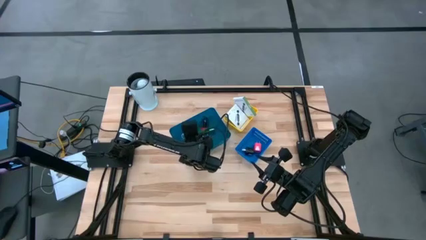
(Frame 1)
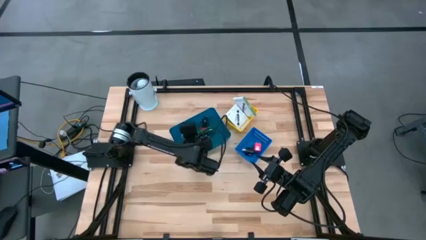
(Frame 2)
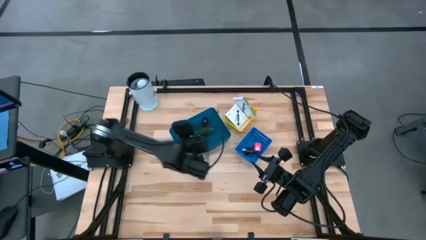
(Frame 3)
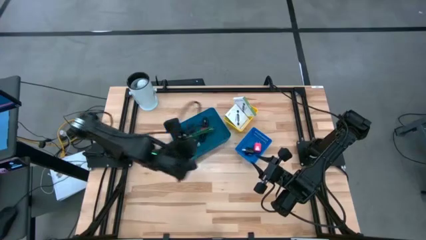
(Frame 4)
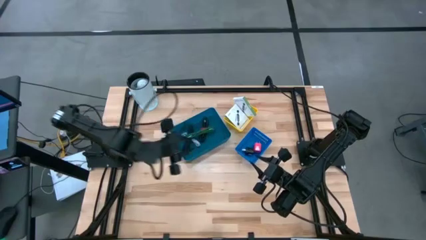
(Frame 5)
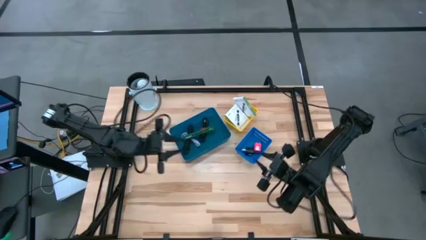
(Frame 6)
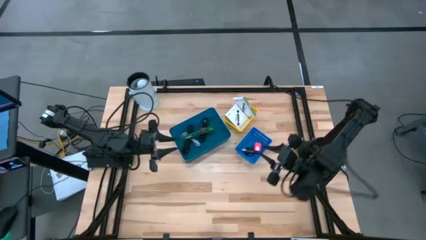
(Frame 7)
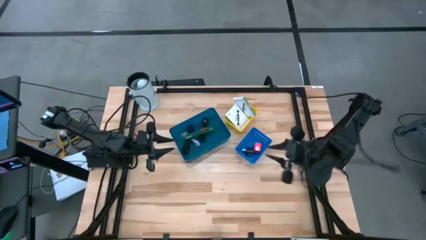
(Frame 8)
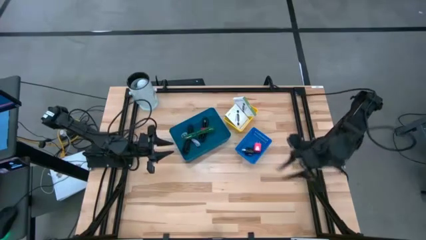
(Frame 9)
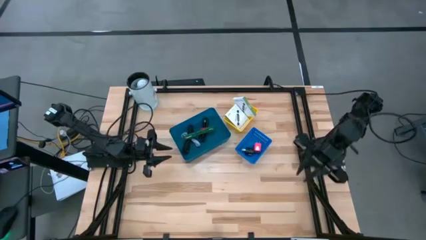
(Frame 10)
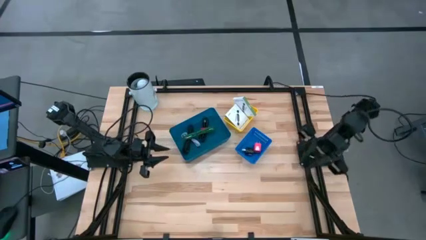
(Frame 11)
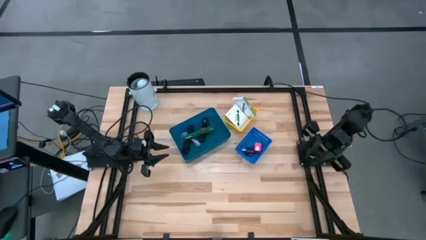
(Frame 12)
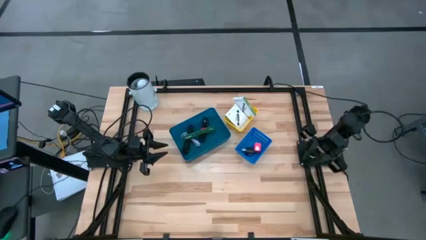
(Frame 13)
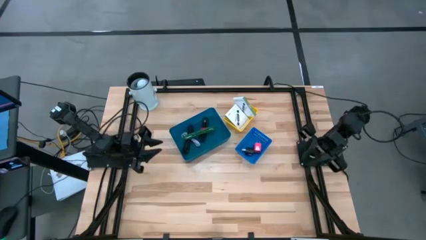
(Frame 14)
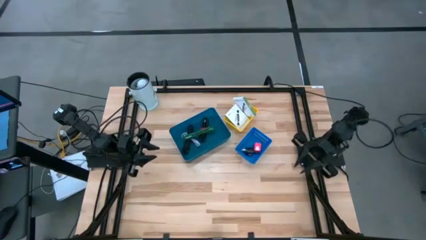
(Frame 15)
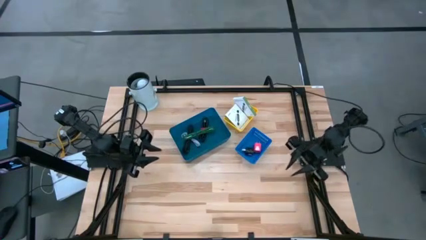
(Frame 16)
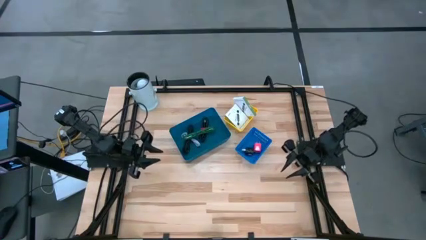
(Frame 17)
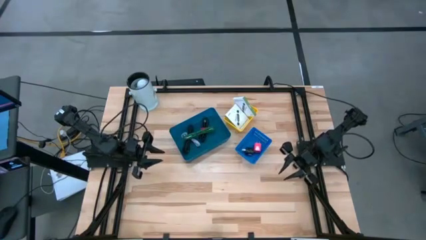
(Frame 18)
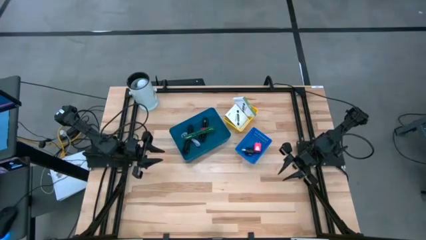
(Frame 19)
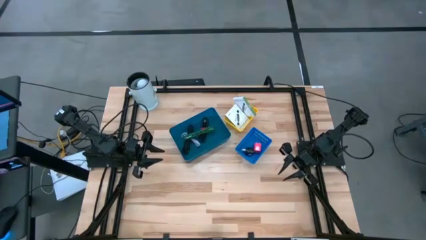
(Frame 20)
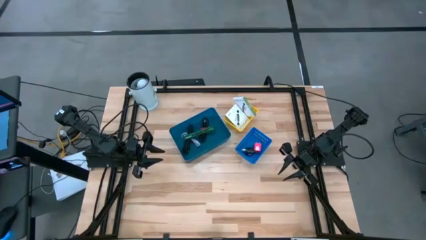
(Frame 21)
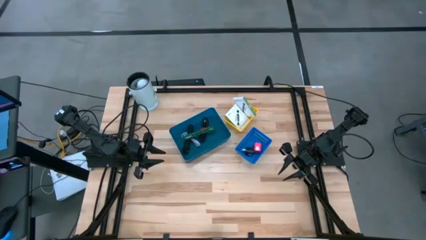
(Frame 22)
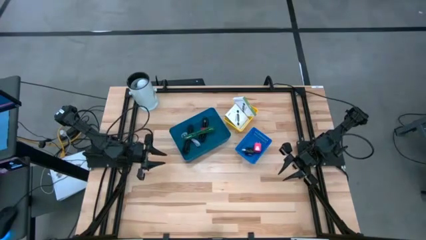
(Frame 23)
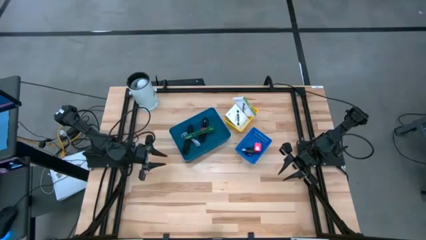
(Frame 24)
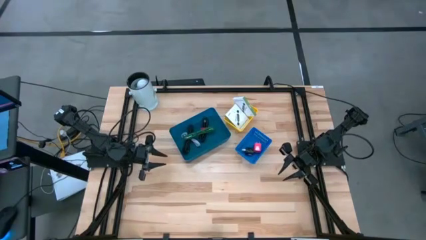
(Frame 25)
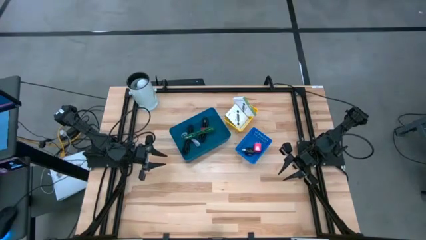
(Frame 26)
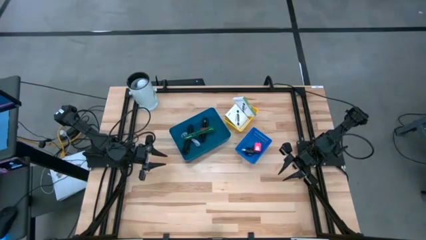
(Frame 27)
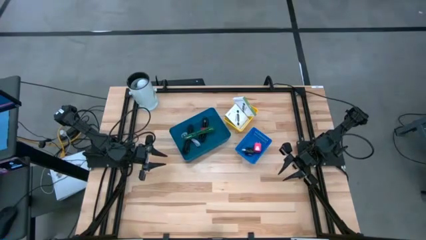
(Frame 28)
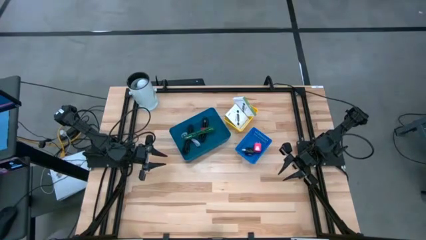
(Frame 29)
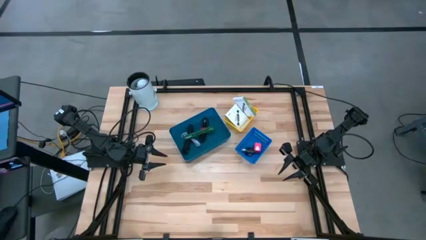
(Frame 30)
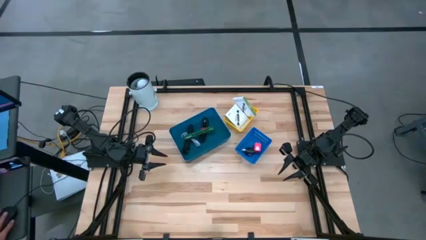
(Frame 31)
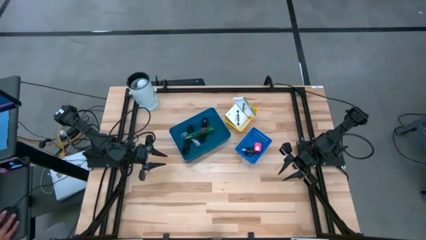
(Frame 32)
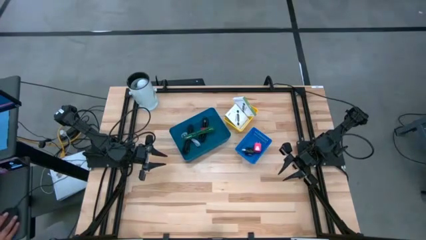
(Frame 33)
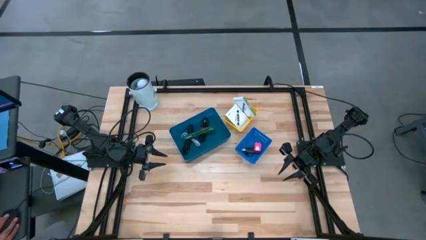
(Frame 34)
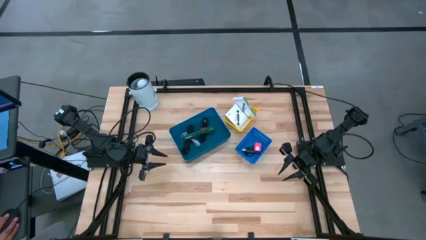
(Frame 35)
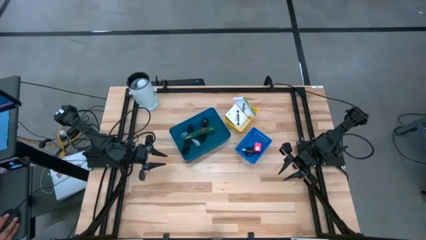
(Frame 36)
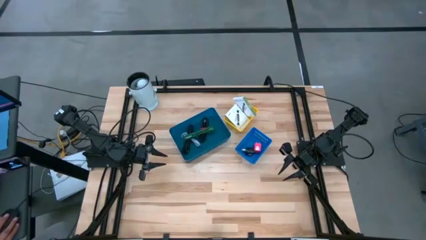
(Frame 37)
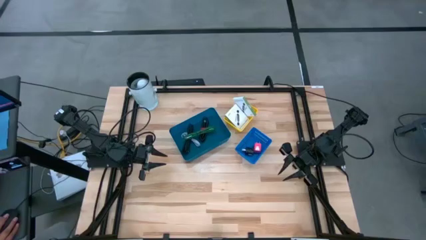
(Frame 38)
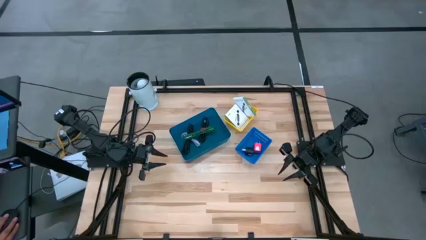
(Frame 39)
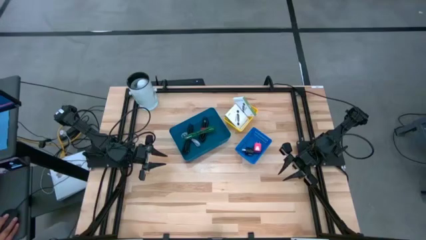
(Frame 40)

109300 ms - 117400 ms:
Task: Pick and place items into bin
Return to Home Position

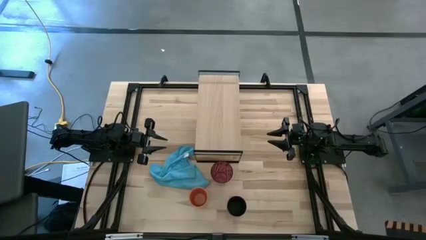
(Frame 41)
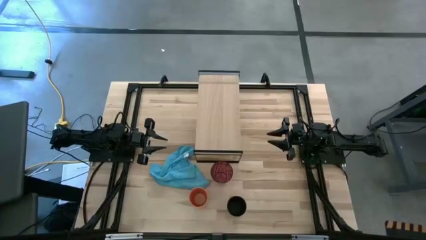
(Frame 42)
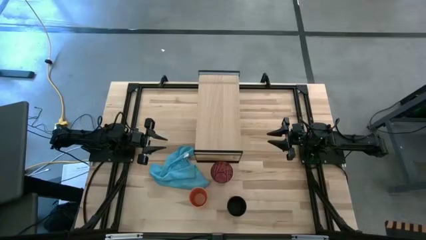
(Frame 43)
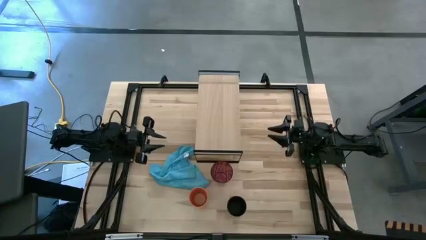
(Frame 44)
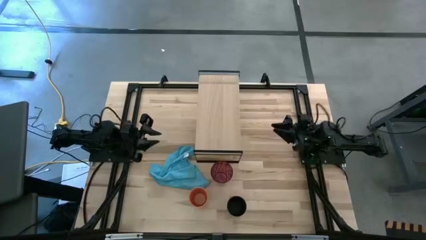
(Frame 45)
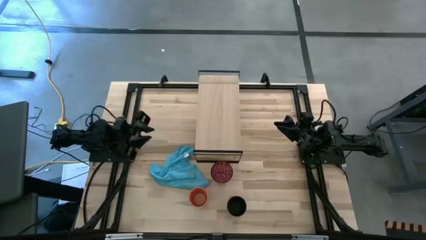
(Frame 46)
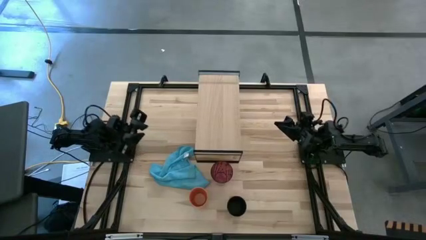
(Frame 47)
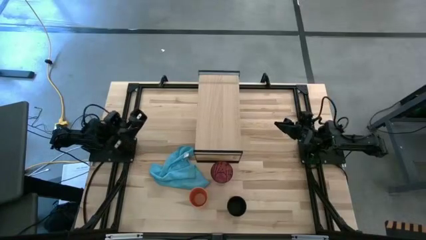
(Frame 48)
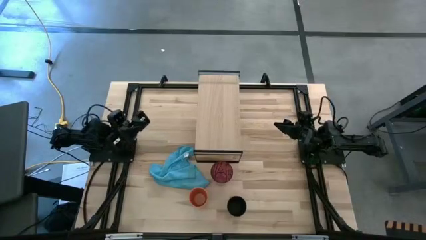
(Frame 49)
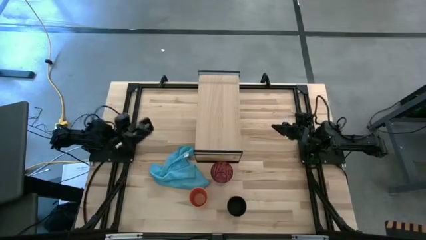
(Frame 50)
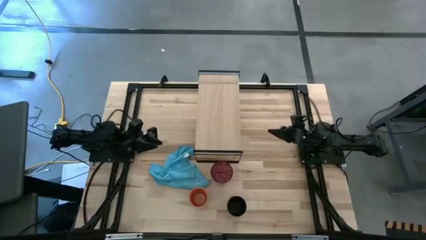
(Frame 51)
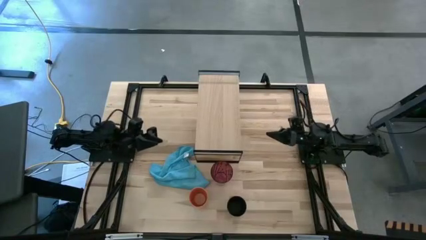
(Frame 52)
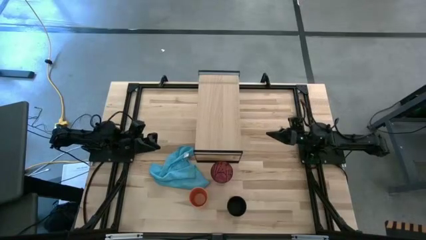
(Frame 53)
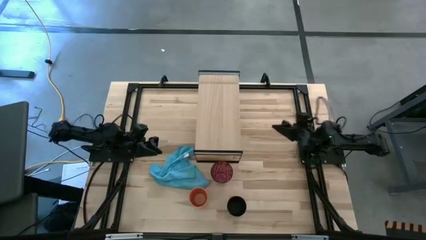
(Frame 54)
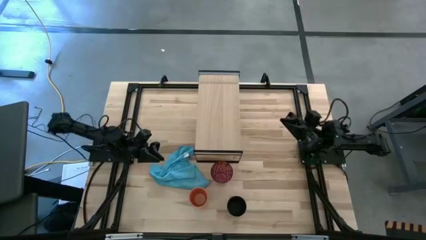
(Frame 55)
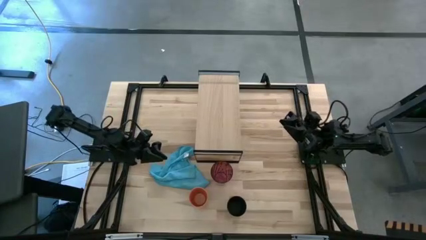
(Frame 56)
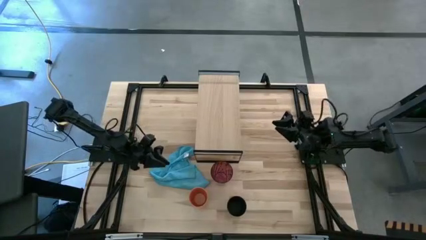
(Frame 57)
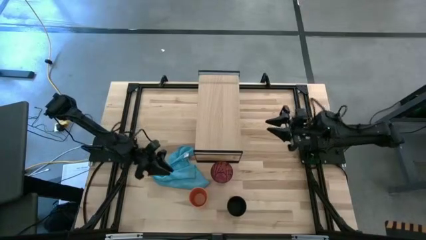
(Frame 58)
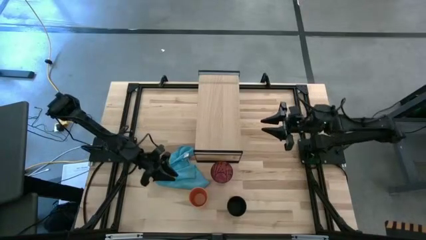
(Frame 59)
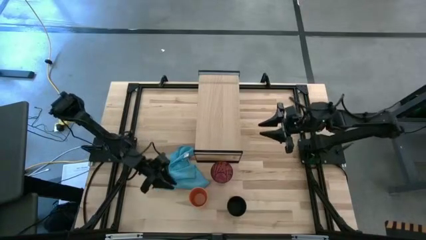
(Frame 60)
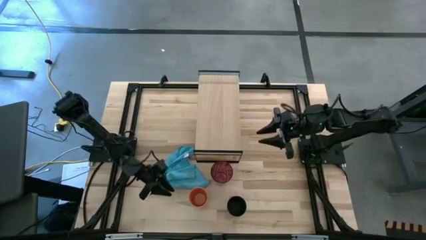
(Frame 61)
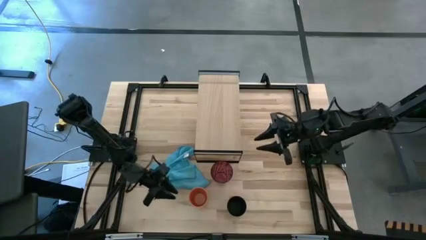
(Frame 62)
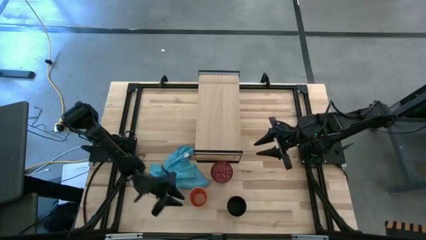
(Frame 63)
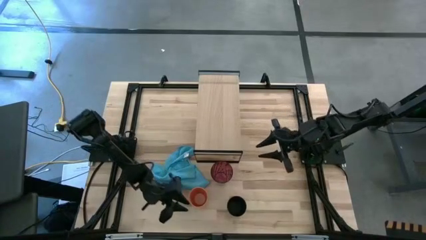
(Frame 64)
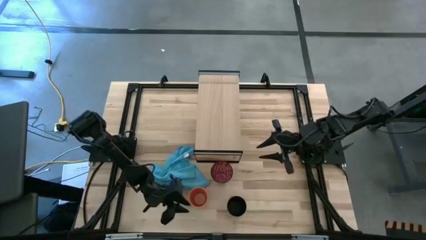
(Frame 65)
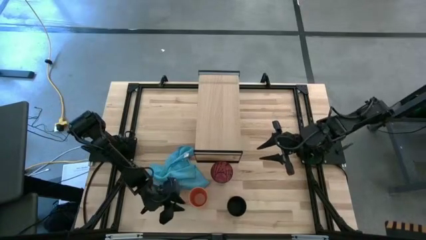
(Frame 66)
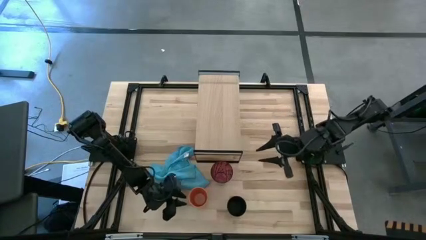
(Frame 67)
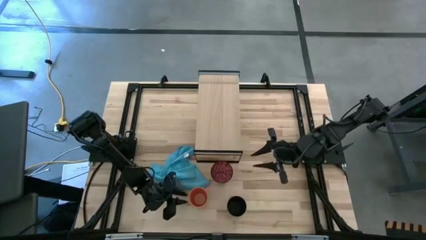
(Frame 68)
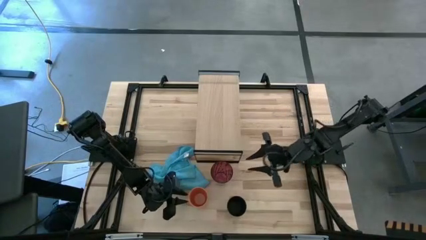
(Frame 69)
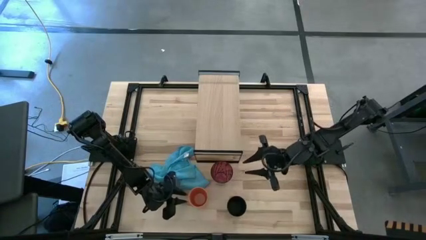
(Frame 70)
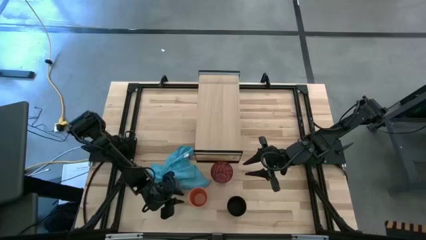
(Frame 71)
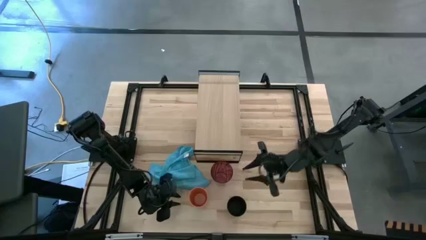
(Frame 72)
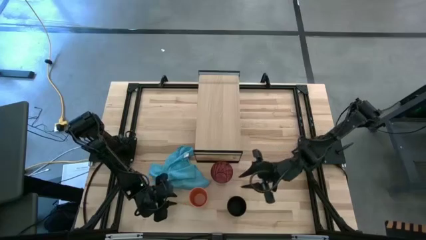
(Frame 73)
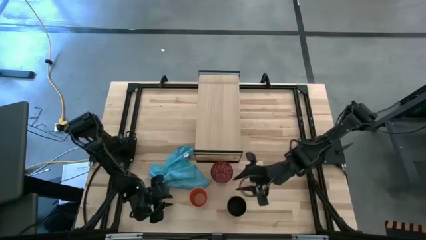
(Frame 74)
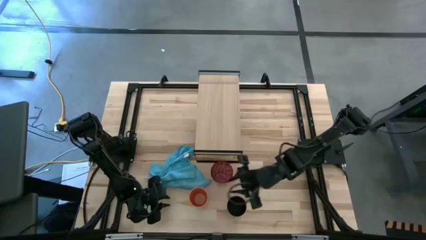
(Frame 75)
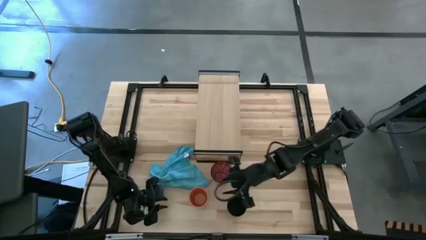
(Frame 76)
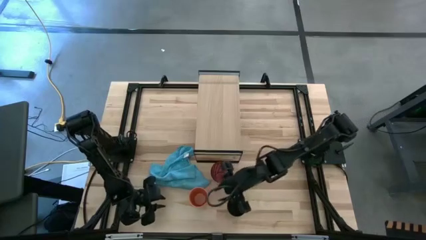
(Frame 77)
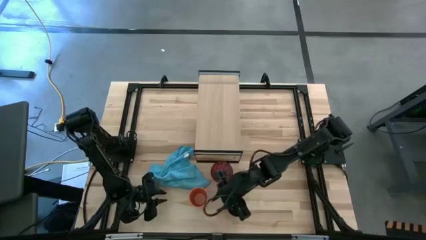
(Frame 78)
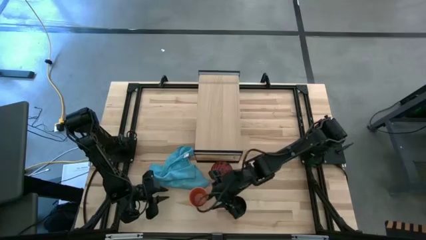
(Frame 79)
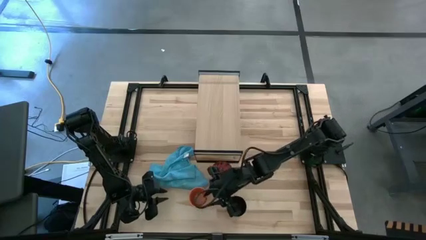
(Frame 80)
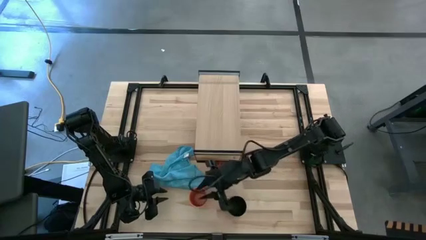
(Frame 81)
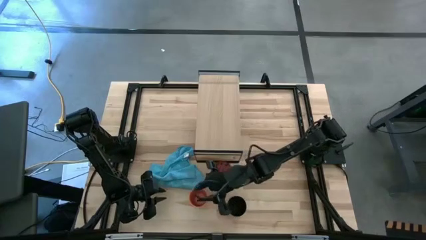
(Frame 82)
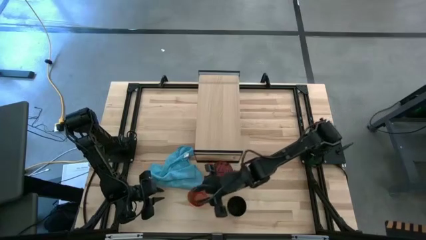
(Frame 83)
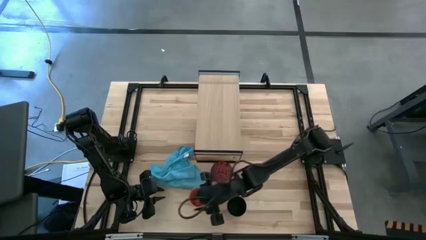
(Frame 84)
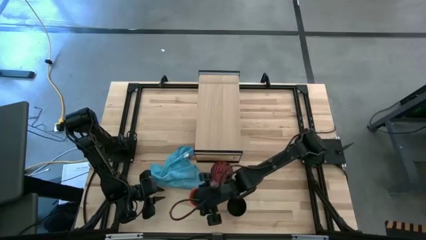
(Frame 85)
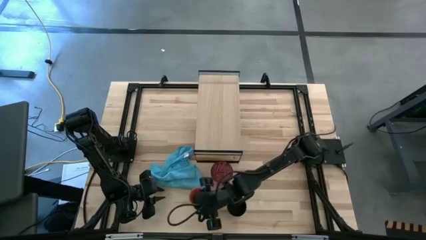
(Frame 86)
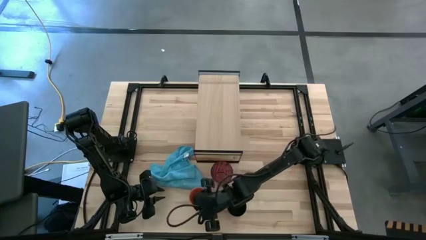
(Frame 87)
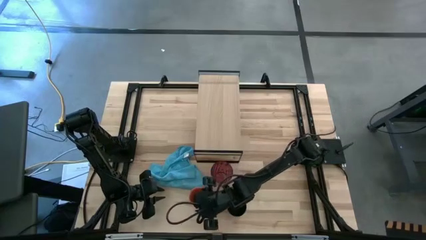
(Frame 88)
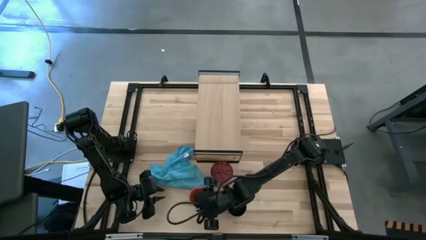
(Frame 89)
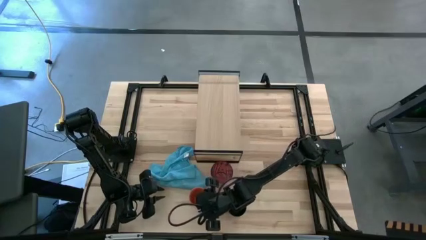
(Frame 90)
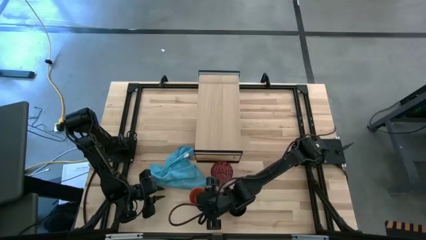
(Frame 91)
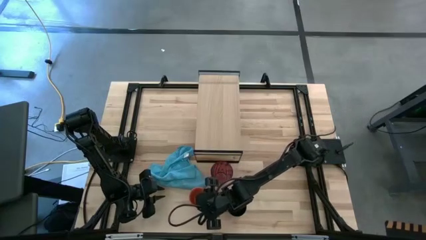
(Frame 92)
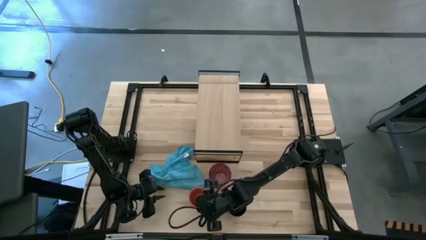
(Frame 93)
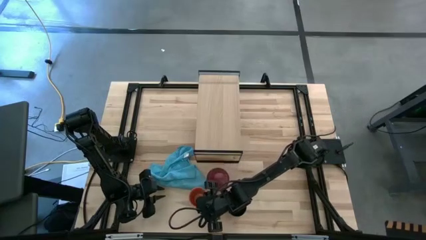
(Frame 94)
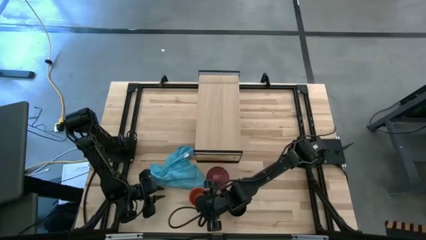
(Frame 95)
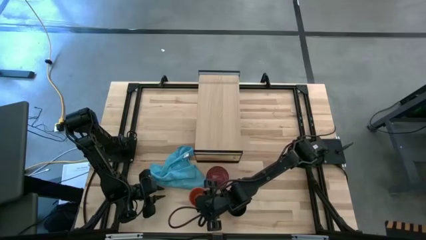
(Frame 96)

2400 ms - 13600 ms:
Task: Stack small to large cups/mugs on shelf
Put the orange cup on the shelf
